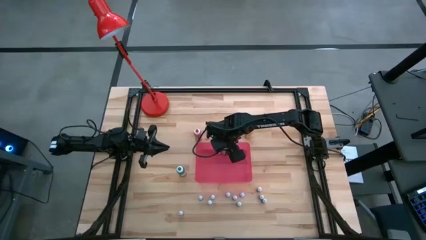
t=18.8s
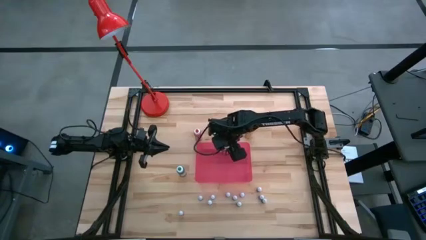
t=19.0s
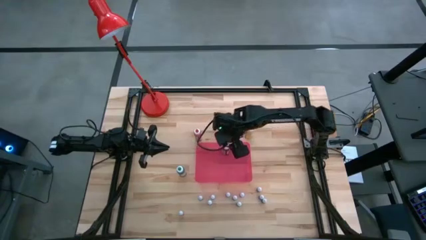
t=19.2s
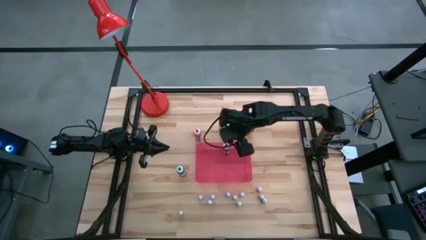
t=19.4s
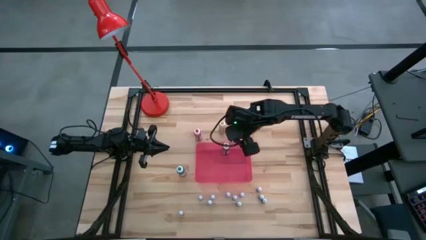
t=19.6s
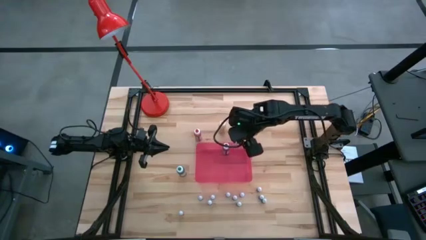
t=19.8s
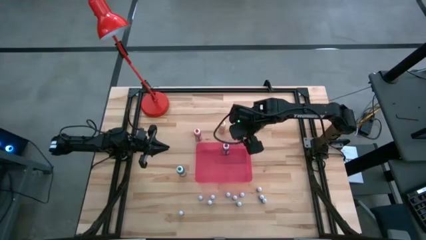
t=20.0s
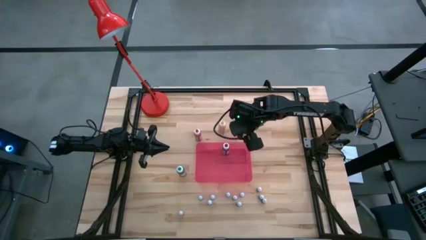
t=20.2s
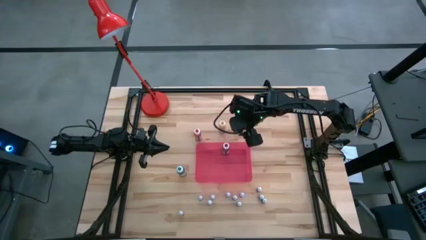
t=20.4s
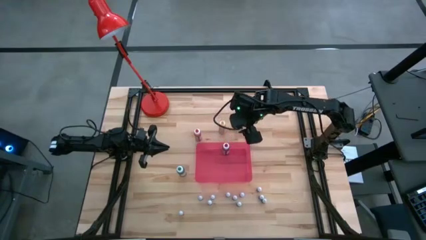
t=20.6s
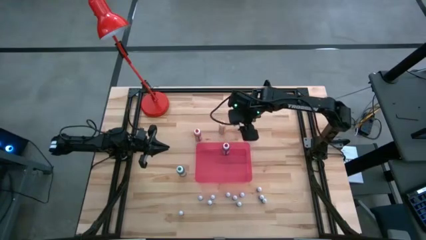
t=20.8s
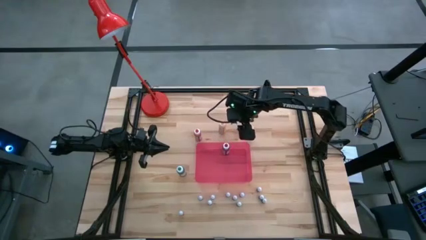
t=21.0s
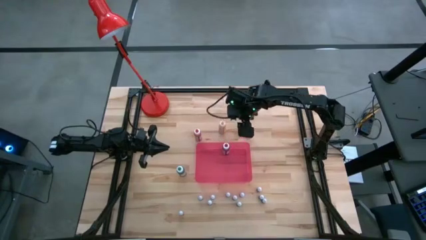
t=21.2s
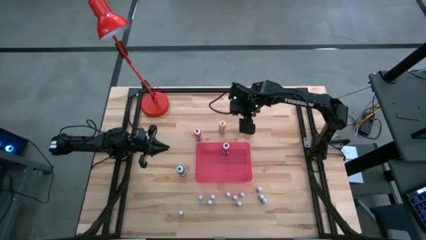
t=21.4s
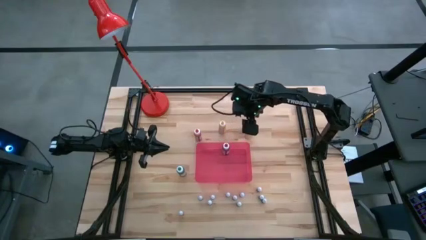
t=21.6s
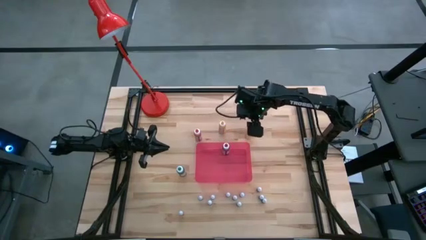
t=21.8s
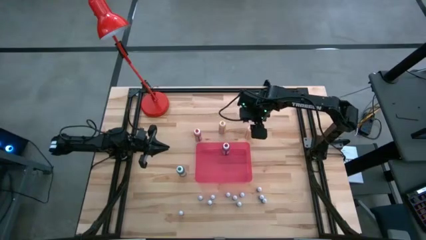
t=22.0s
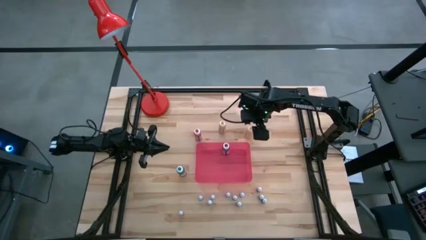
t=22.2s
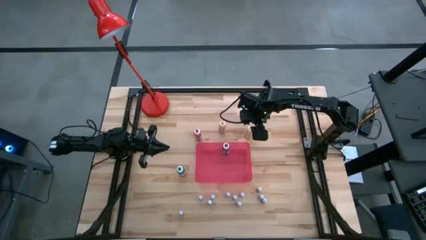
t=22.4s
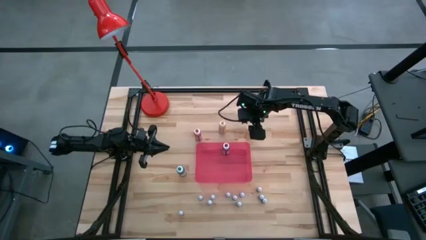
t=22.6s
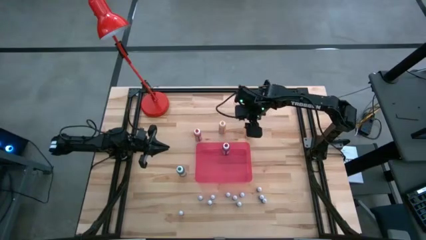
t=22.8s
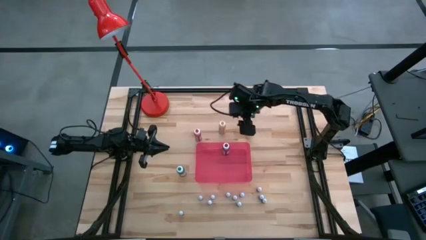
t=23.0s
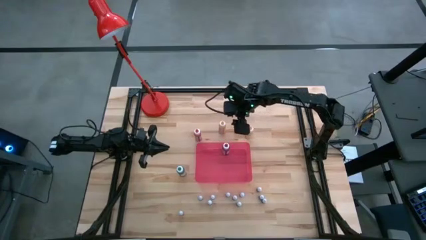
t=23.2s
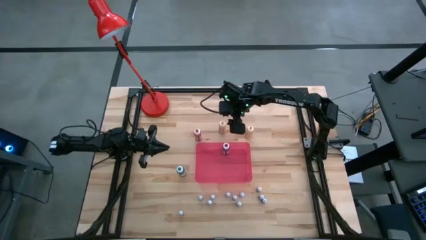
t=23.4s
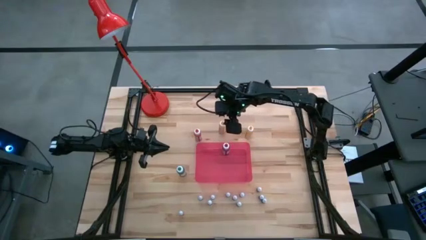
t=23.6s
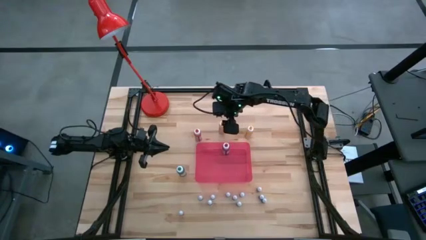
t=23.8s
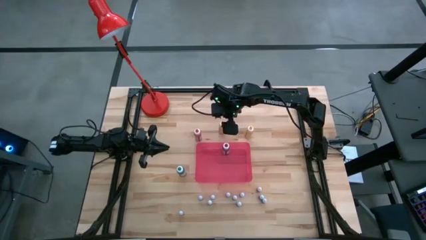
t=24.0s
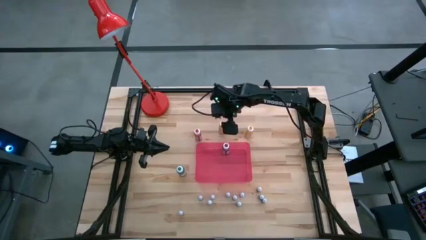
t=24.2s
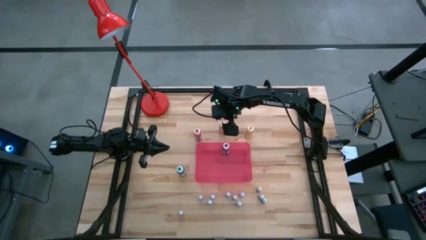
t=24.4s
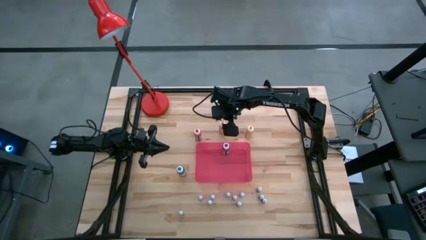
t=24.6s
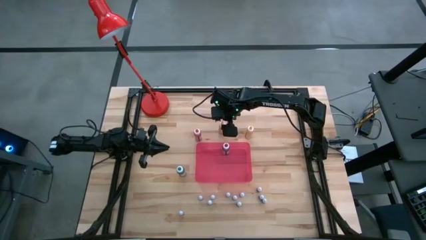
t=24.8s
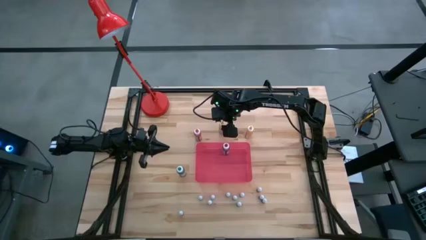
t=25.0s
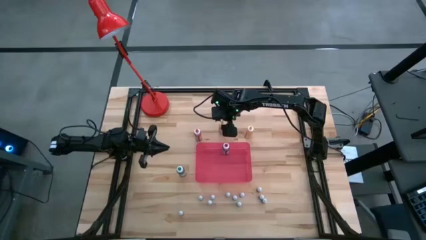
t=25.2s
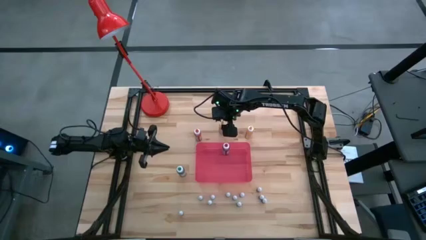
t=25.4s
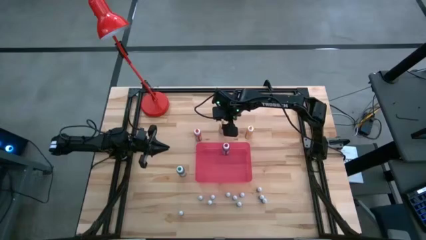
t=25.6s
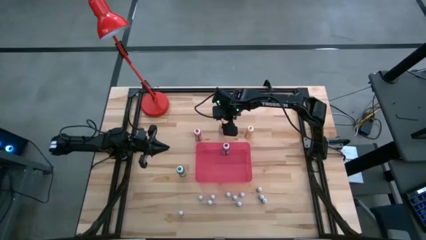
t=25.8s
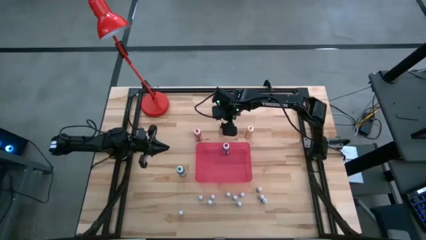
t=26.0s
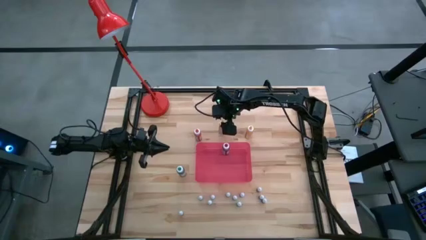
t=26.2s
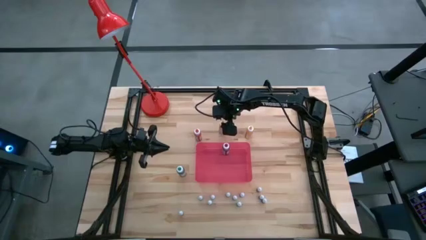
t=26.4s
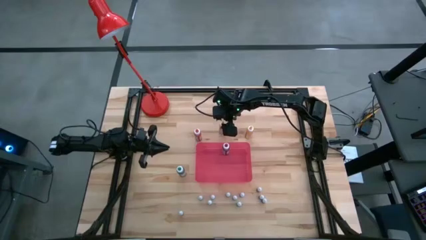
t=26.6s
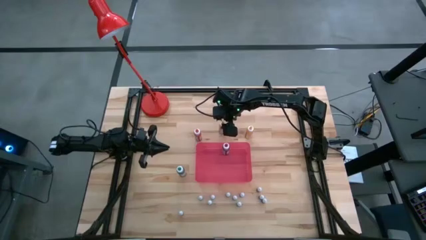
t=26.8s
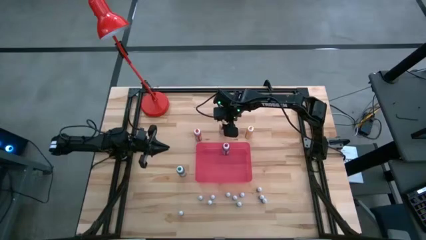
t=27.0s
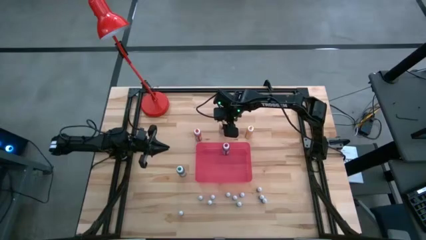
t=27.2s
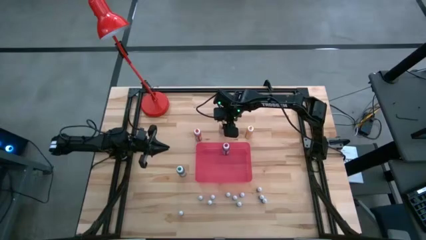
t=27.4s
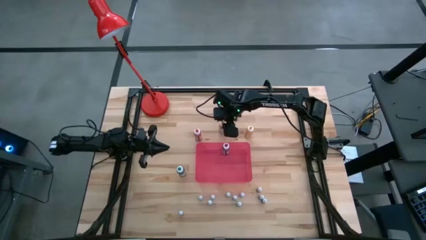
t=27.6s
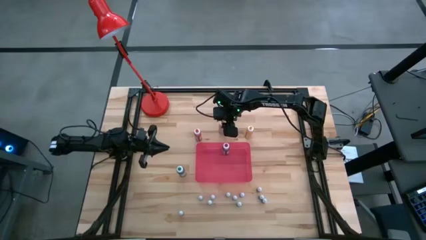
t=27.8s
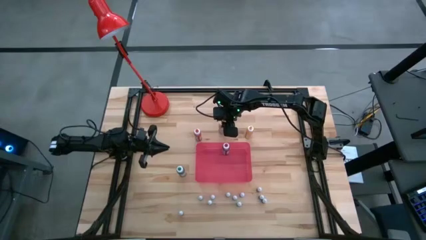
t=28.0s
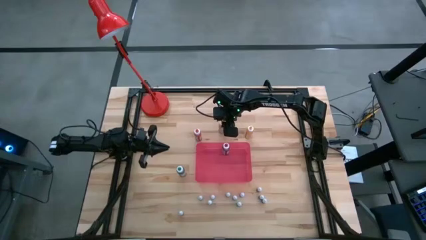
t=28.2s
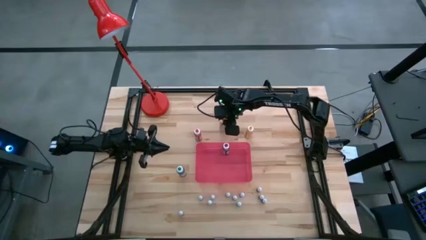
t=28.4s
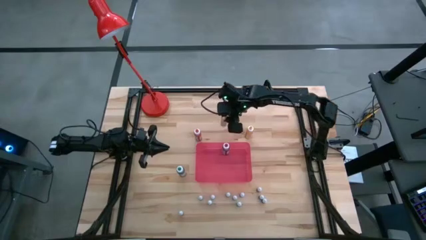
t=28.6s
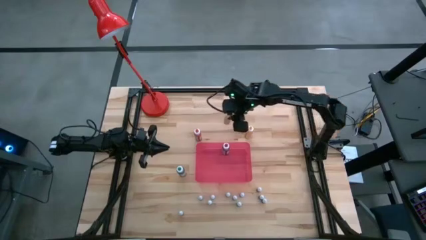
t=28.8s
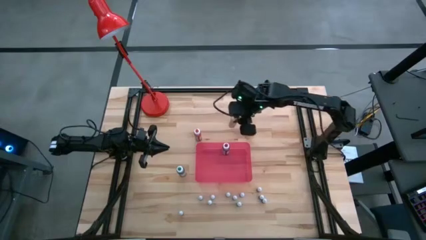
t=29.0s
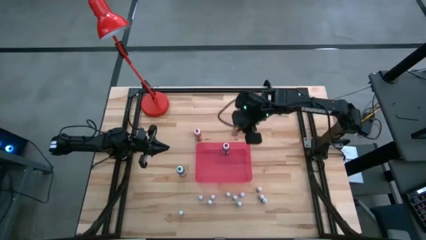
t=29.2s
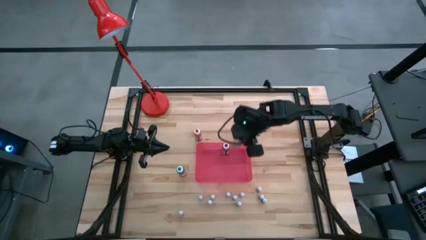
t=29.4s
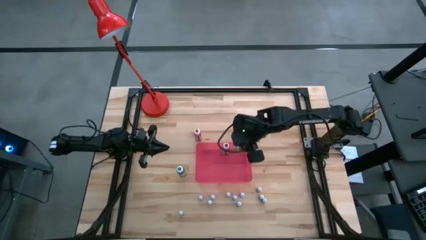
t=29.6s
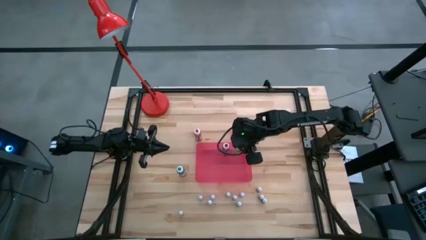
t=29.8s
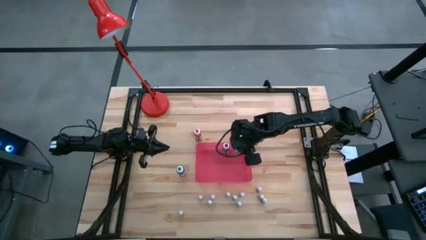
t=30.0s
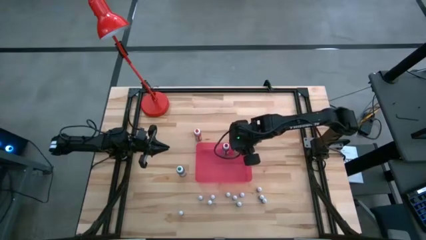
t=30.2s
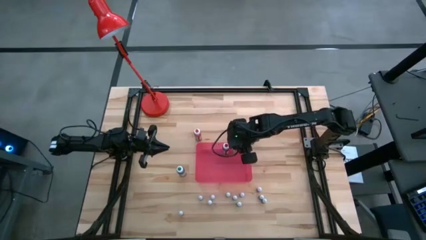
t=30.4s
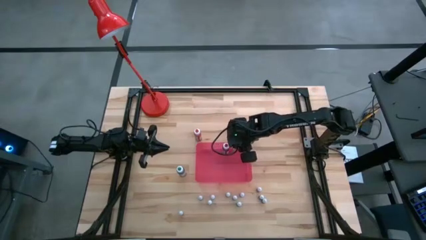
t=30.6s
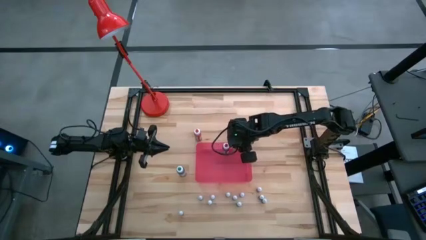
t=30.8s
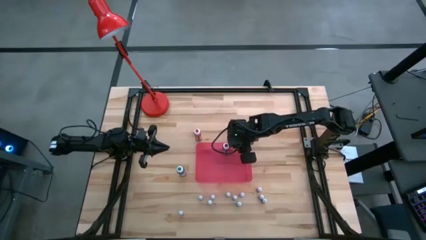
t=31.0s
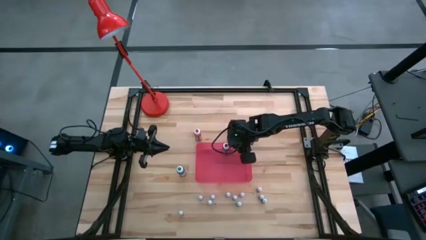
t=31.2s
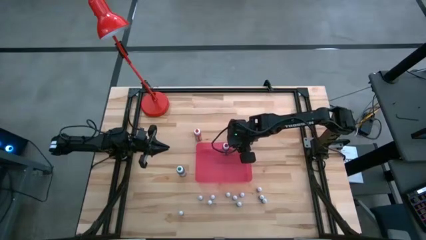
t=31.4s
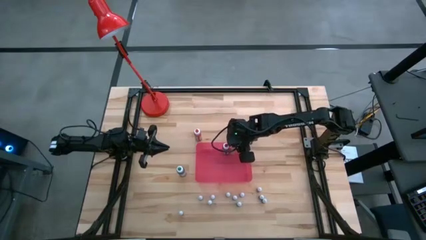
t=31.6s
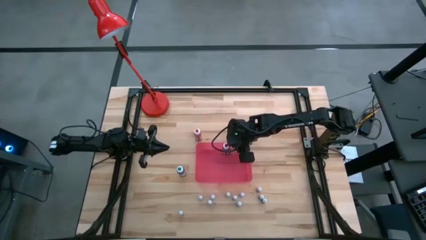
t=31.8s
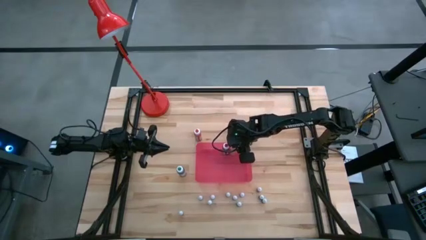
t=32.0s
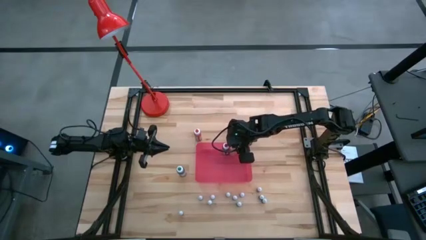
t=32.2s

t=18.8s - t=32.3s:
Task: Pick & Place food coloring
Put the left large yellow food coloring bottle into the container

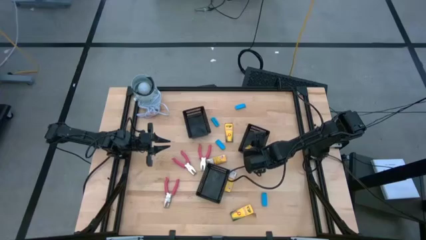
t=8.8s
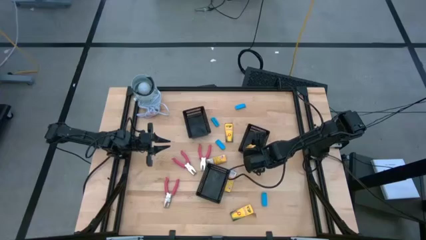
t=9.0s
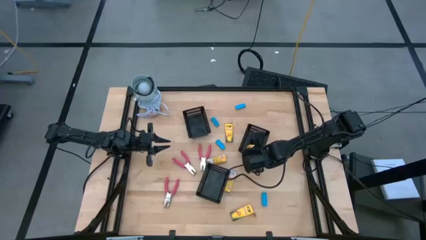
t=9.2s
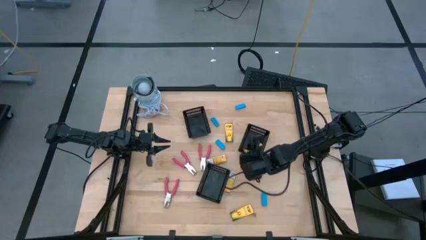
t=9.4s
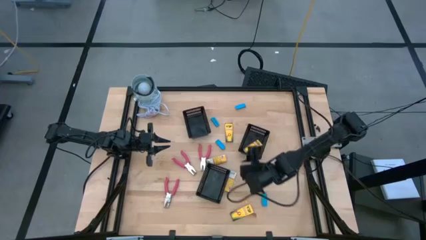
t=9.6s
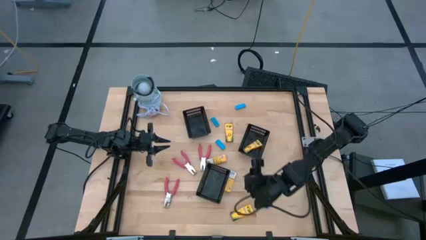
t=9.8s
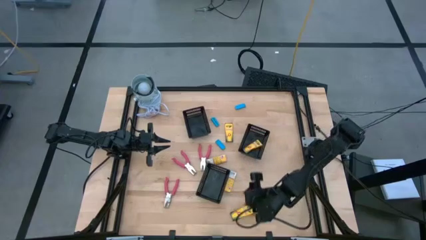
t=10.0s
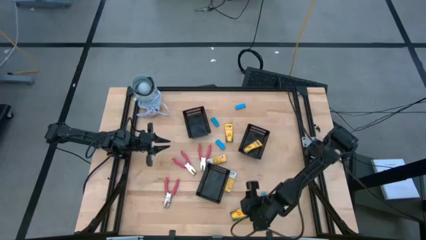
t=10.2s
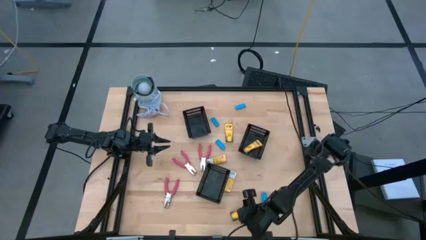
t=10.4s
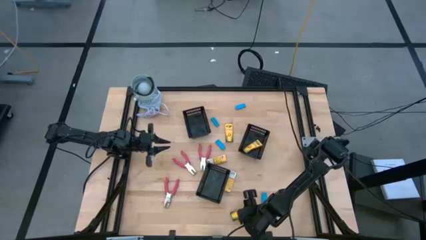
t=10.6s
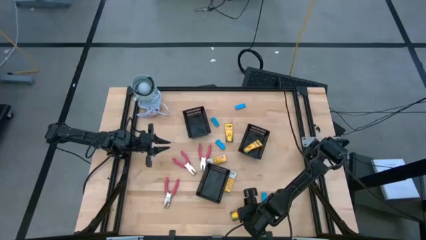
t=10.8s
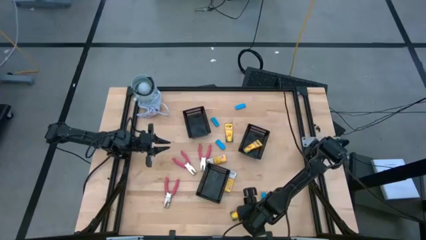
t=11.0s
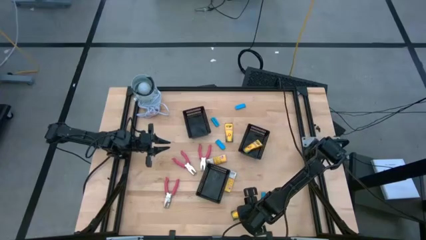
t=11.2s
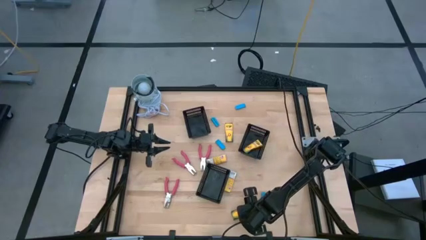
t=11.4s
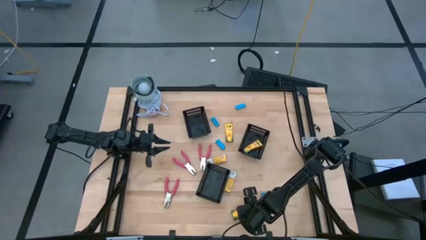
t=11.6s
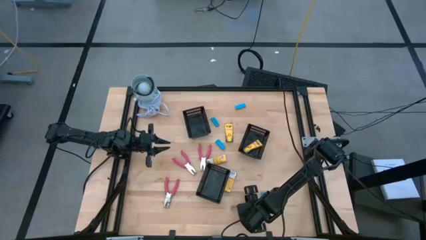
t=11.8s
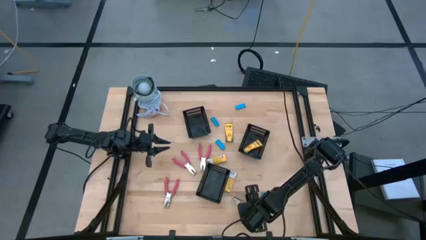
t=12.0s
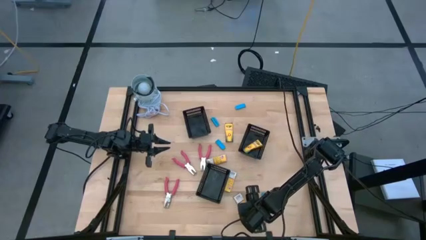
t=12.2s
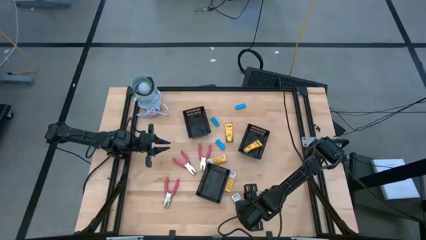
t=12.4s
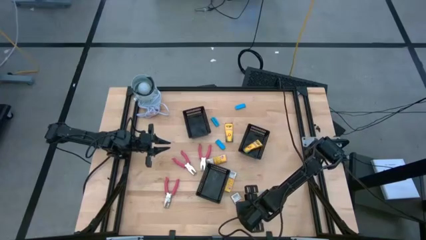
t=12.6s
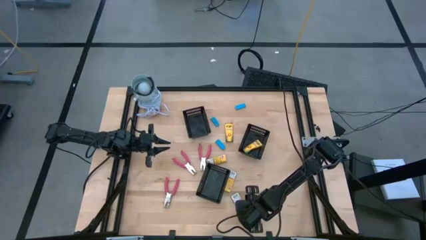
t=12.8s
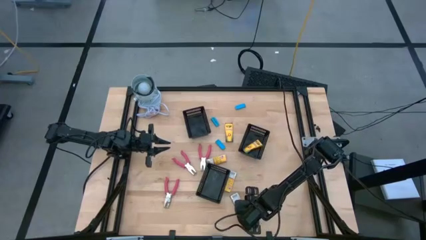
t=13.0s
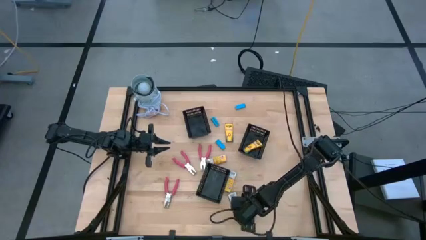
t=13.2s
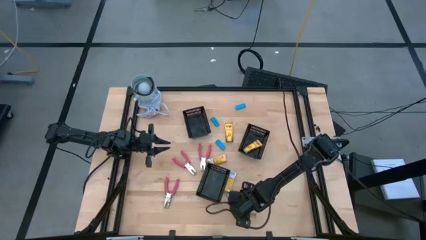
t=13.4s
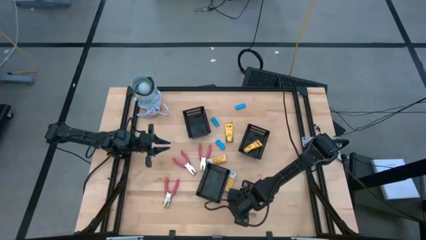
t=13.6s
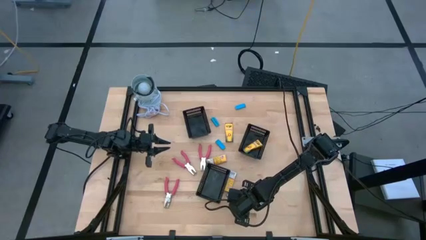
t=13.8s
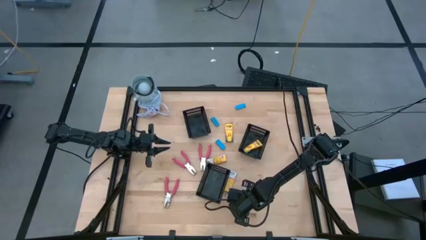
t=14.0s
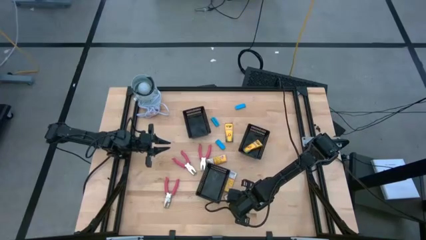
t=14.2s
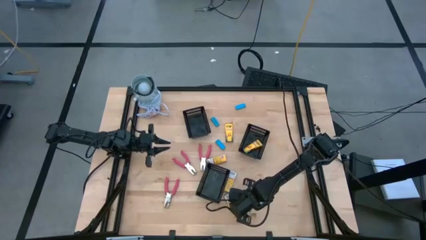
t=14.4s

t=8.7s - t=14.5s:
Task: Pick & Place School Supplies
Put the yellow crayon box into the right black basket
